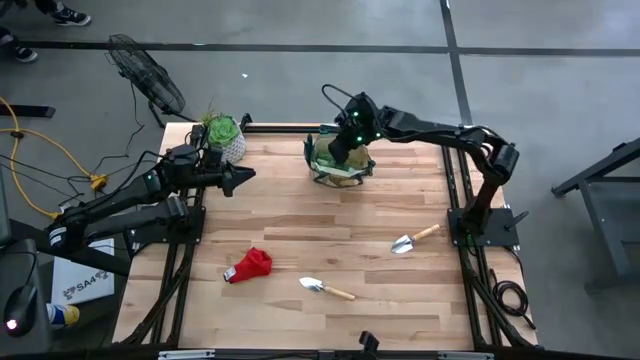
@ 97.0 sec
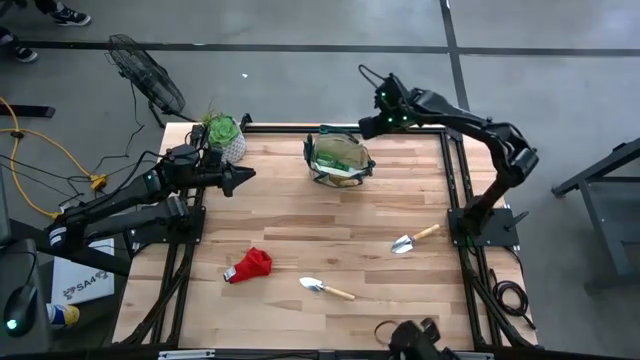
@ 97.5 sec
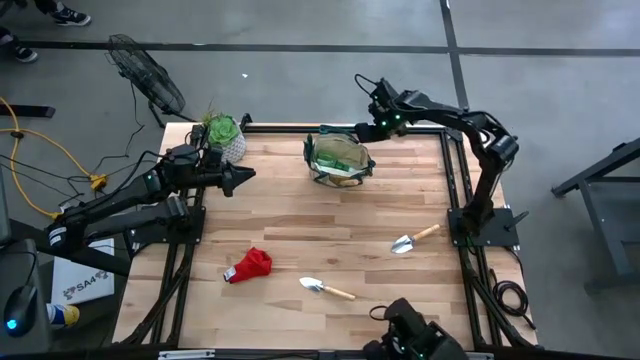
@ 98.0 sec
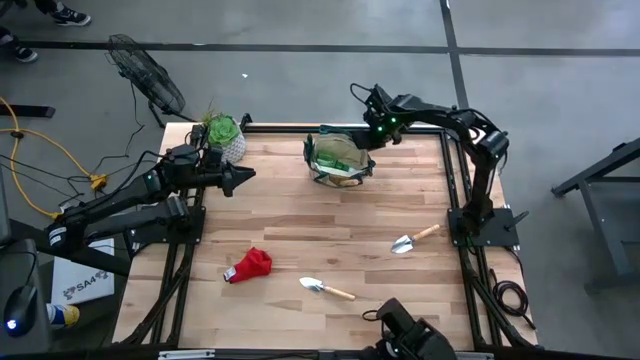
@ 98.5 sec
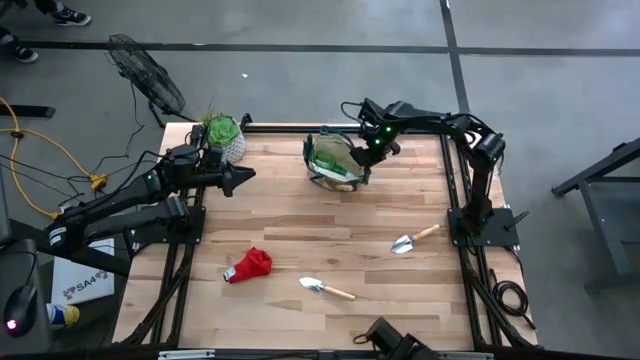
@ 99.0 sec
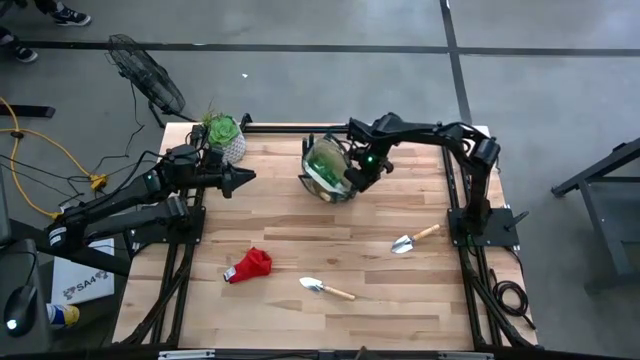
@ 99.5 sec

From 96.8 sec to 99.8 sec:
Task: Pick & Place Garden tools in Gardening bag
Adjust the gardening bag on the table

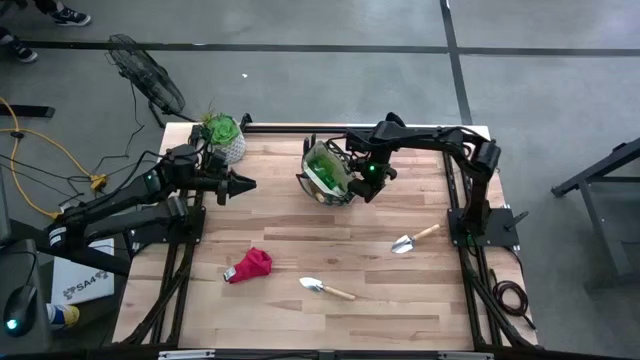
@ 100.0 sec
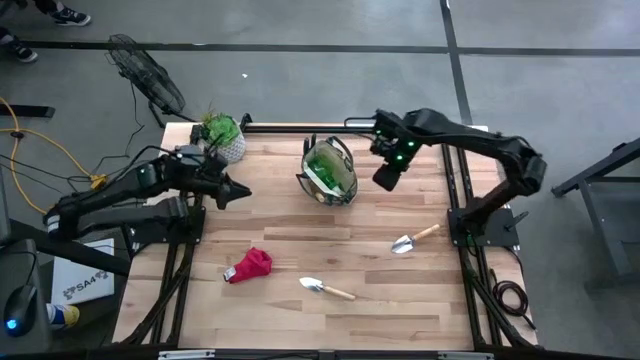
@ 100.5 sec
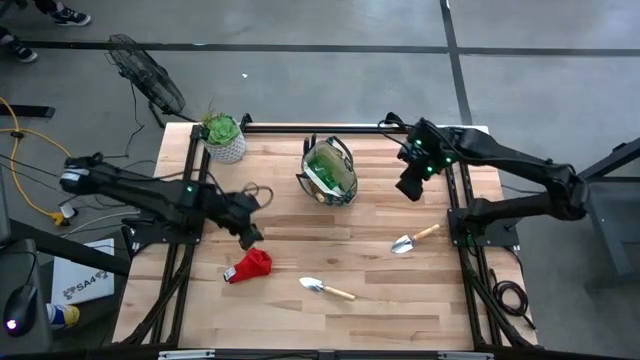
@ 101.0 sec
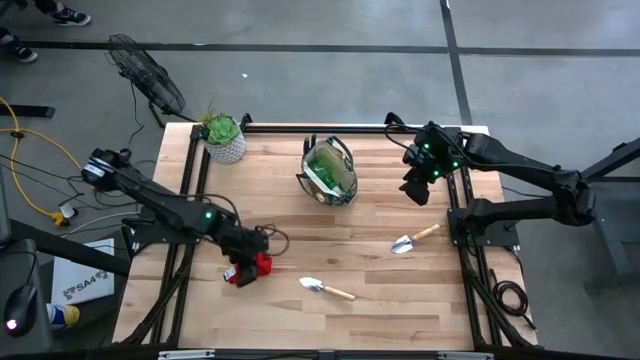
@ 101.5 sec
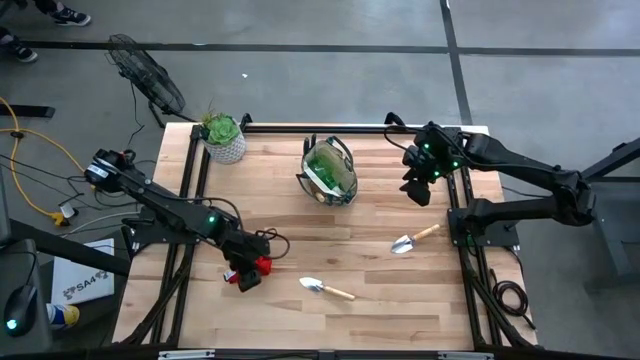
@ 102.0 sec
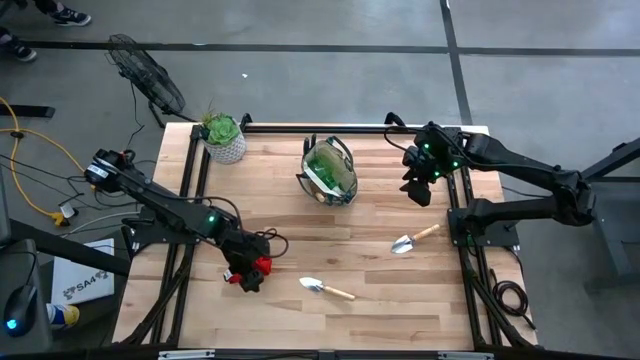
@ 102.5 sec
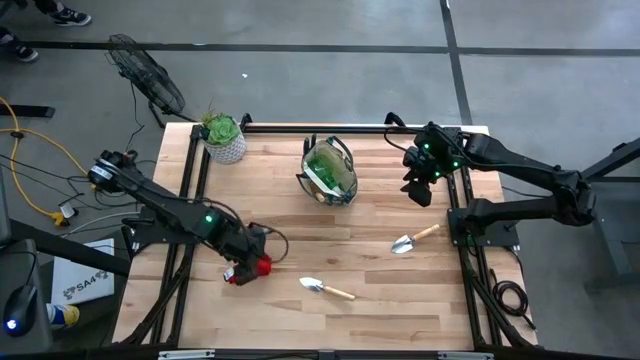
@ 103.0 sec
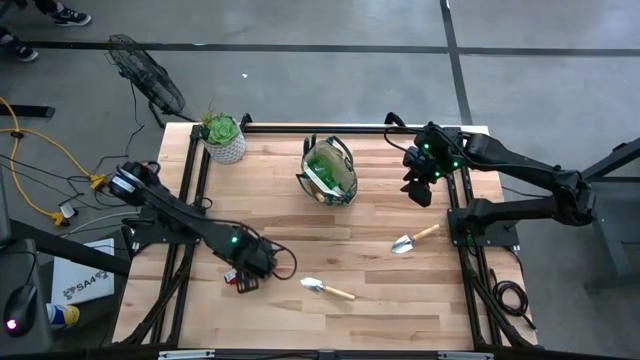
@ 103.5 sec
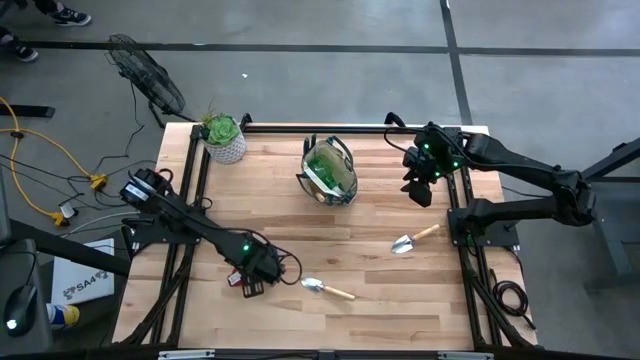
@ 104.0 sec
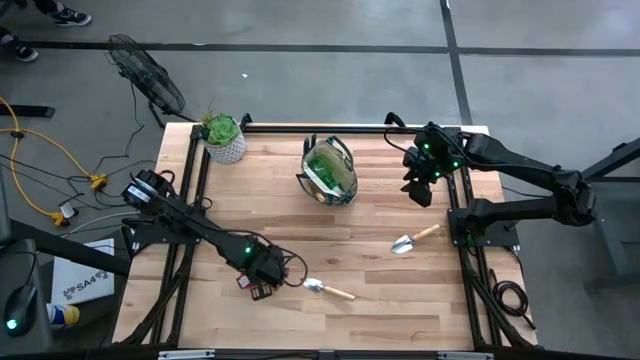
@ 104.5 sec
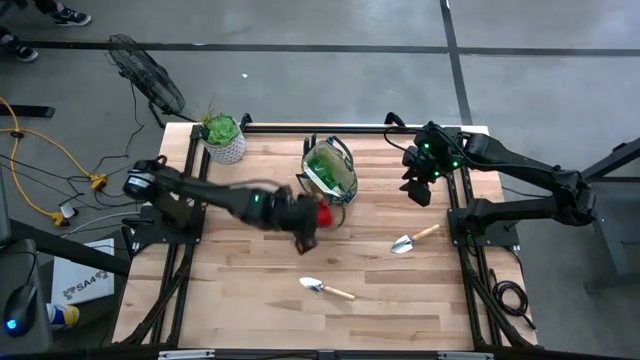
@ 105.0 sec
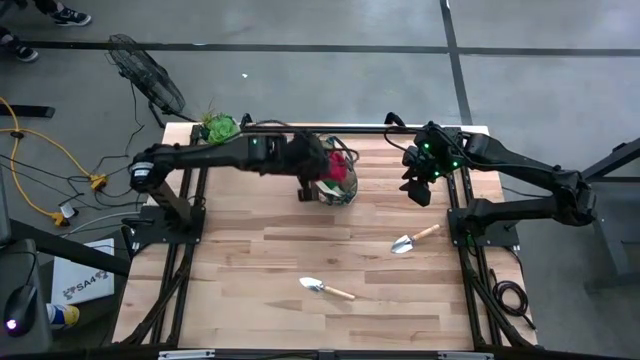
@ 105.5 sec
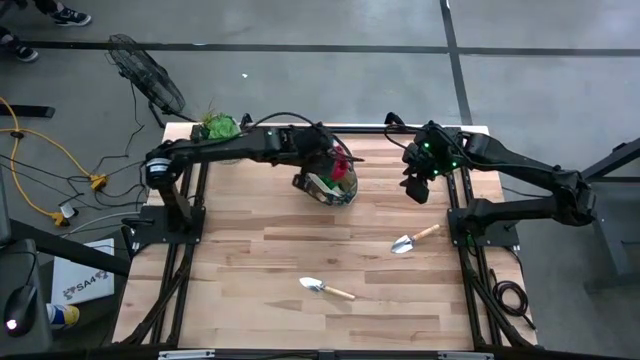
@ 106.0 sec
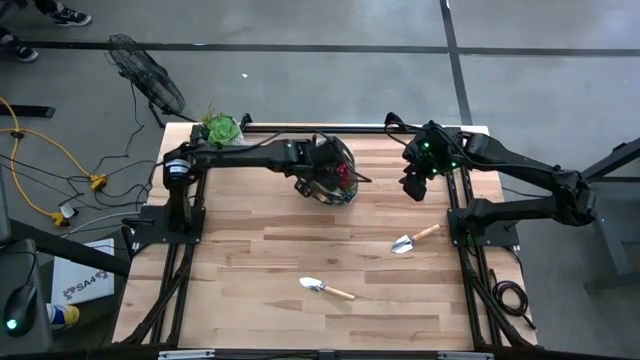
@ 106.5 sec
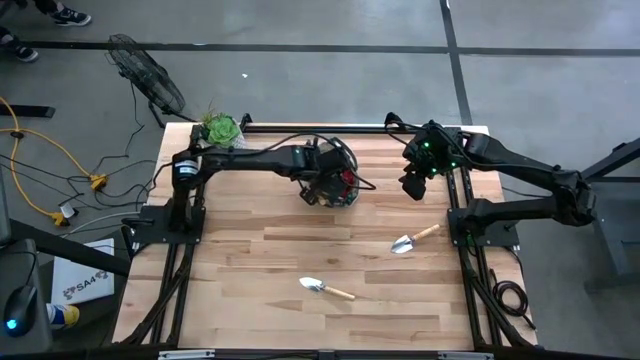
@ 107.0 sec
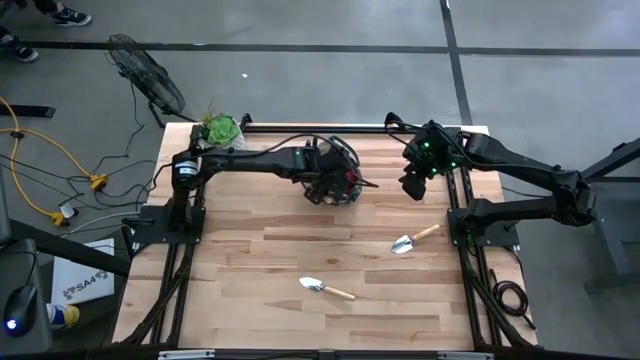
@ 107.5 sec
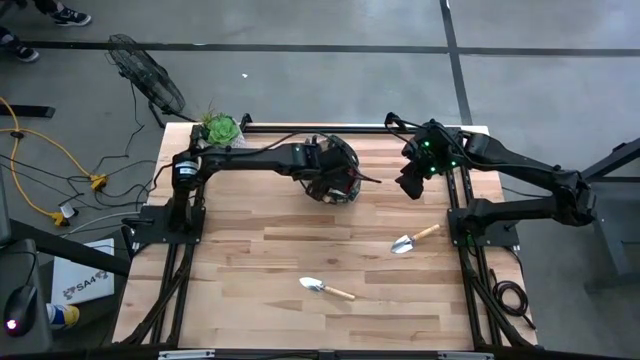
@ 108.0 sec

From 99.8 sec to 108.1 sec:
Put the gloves into the gardening bag
